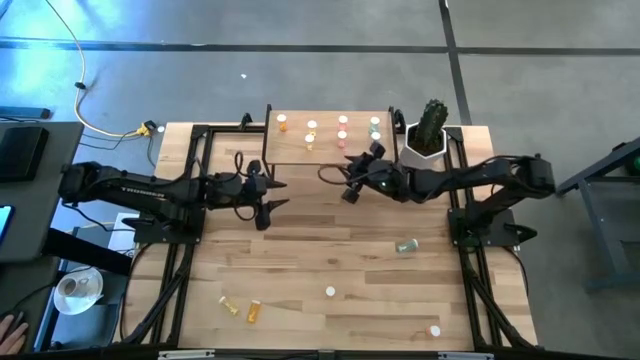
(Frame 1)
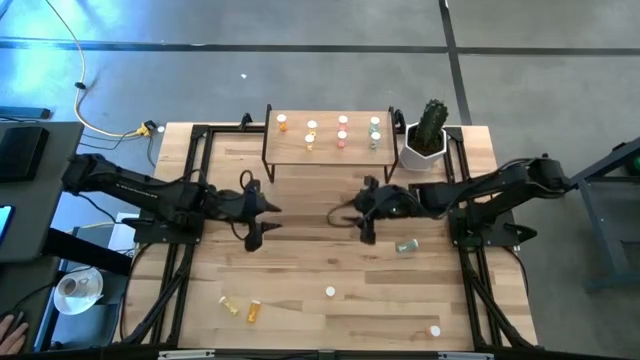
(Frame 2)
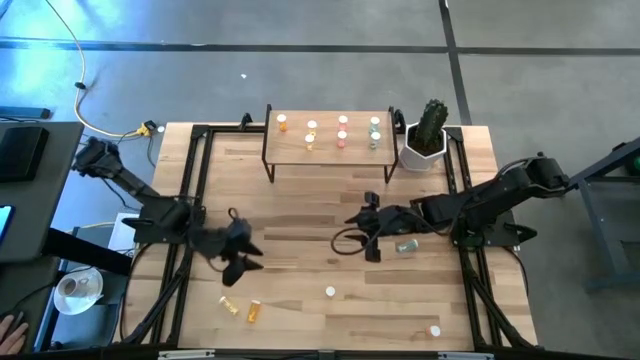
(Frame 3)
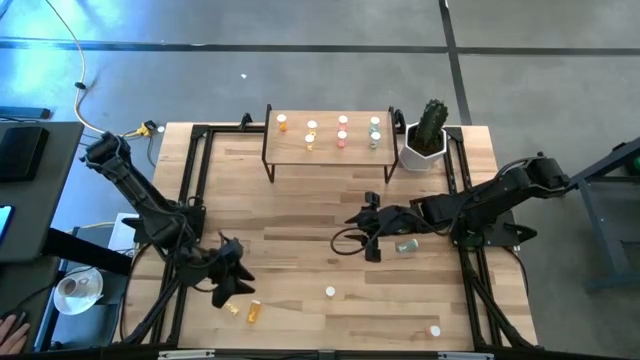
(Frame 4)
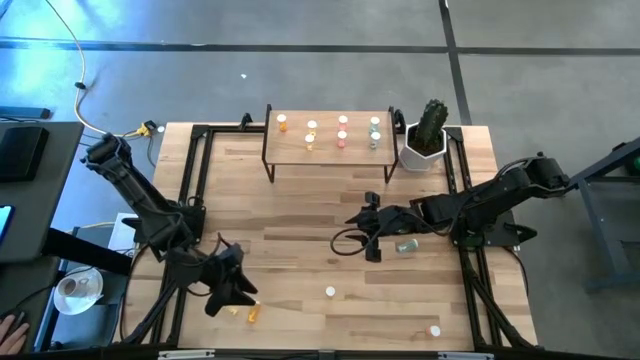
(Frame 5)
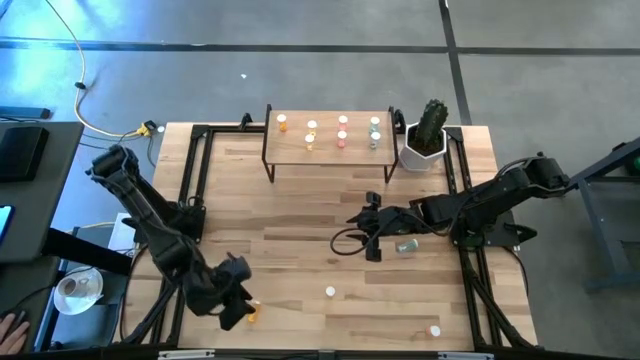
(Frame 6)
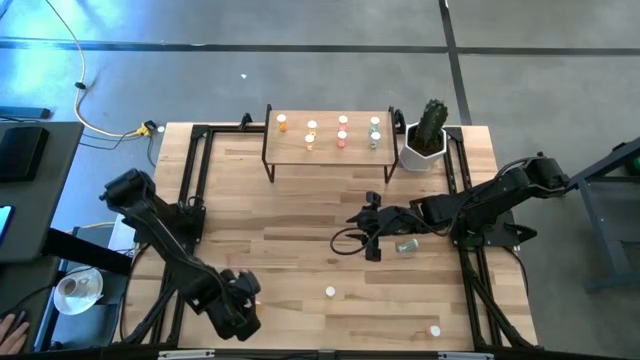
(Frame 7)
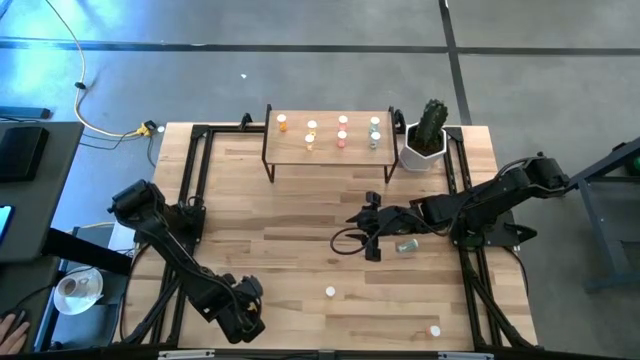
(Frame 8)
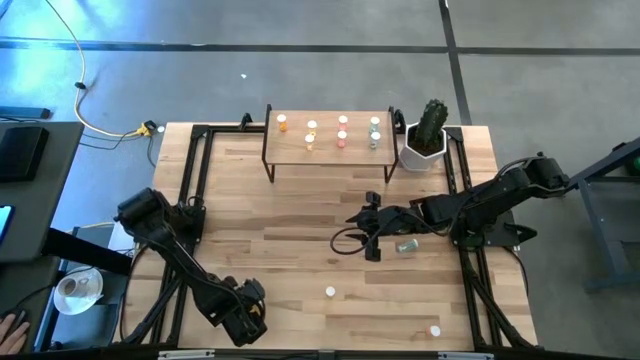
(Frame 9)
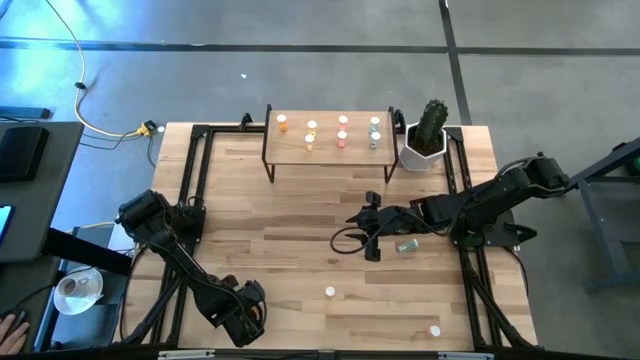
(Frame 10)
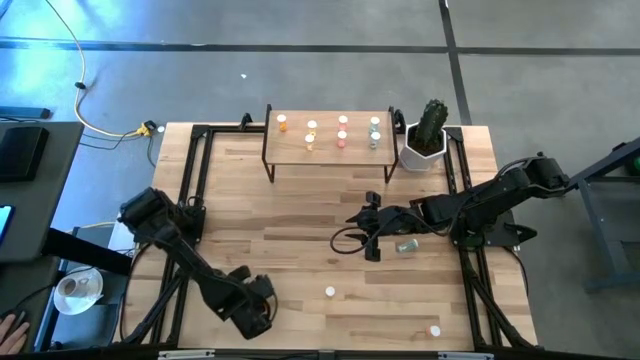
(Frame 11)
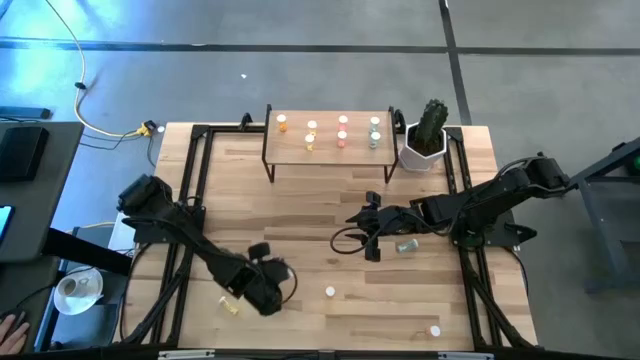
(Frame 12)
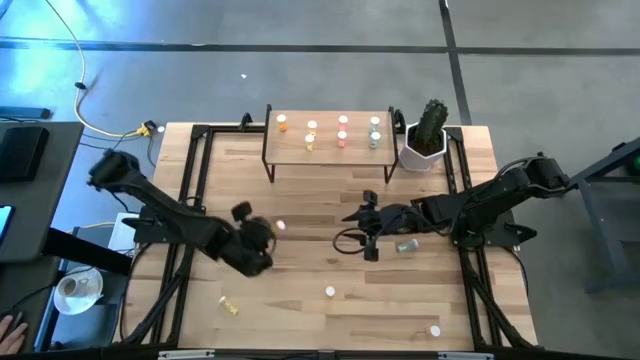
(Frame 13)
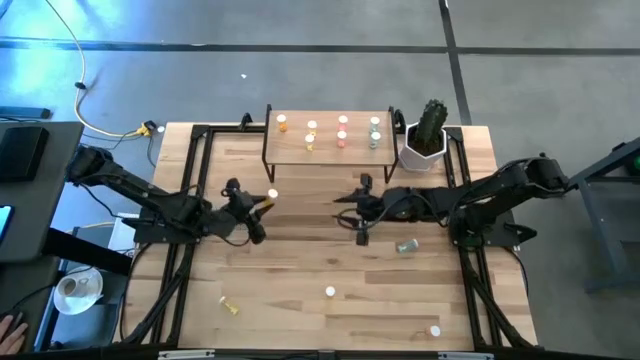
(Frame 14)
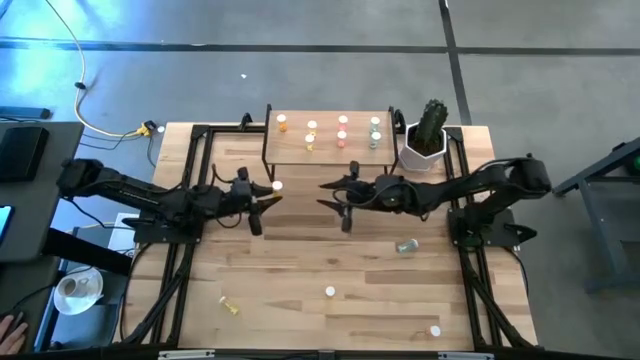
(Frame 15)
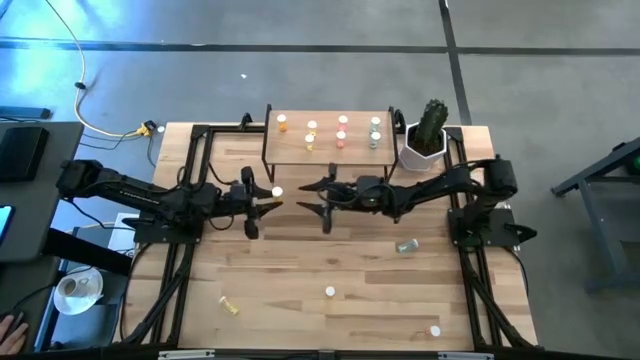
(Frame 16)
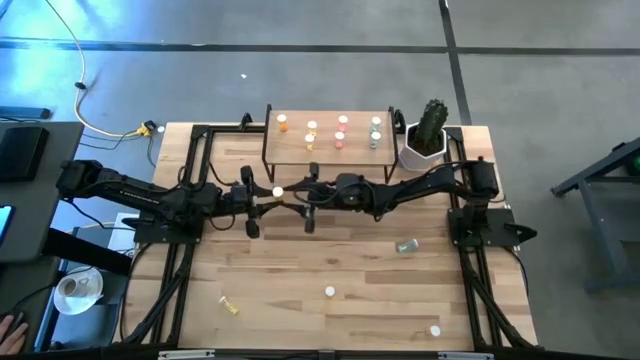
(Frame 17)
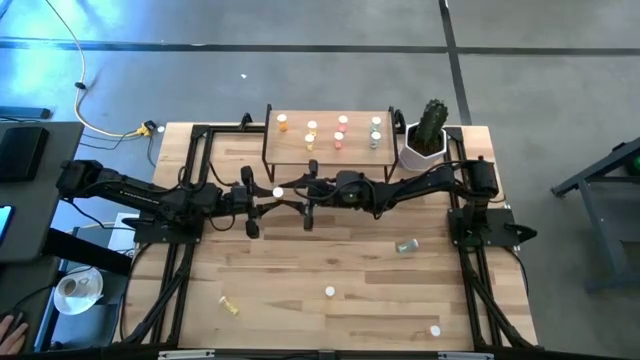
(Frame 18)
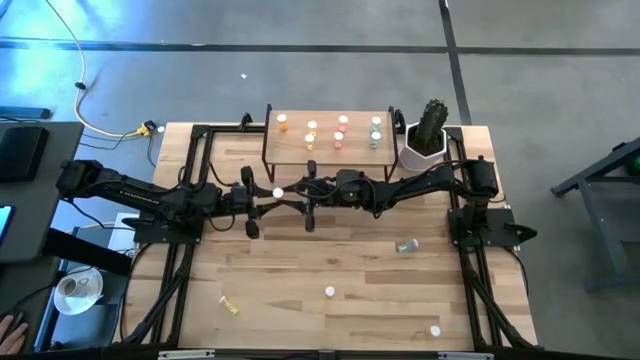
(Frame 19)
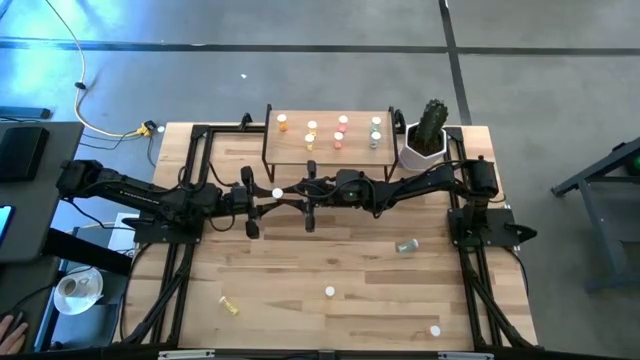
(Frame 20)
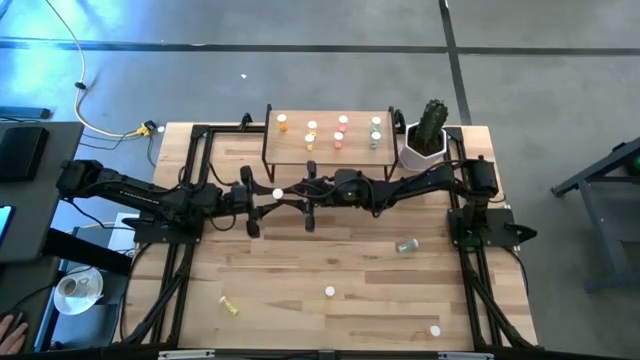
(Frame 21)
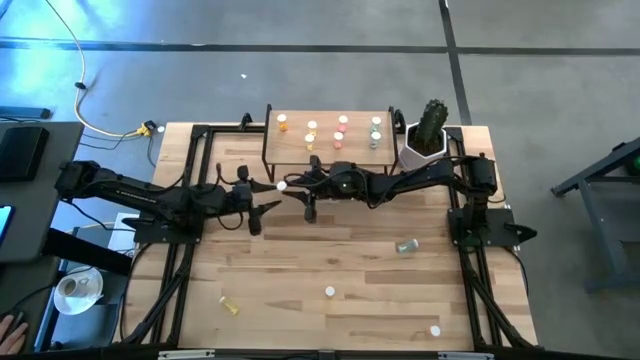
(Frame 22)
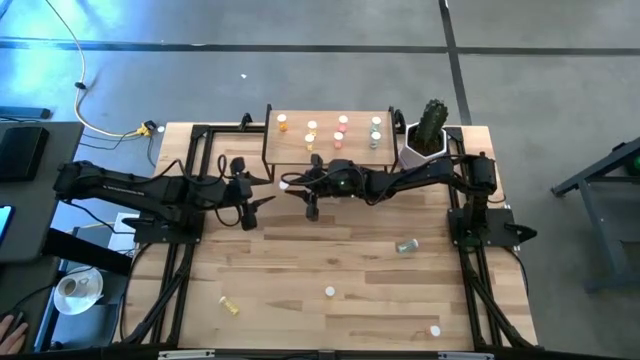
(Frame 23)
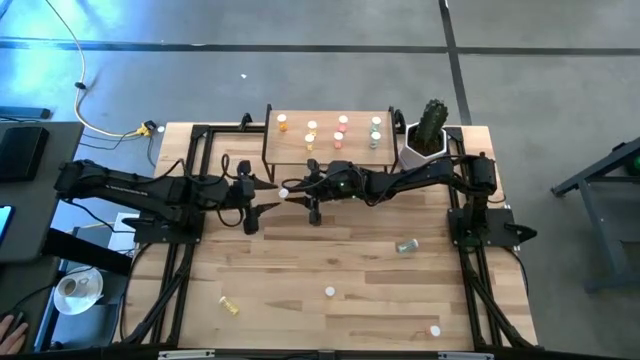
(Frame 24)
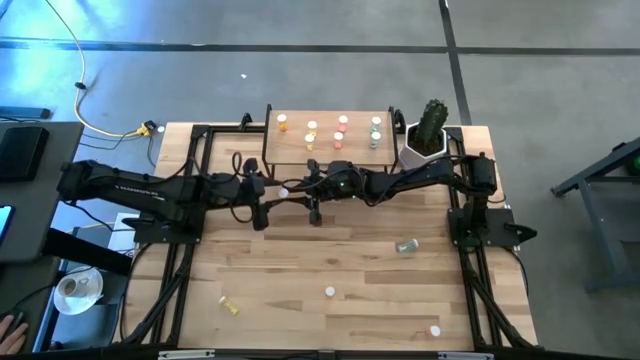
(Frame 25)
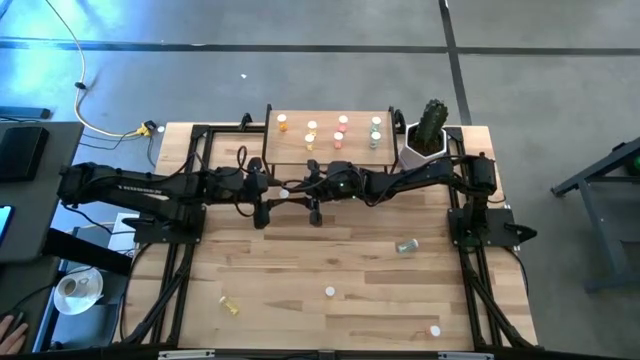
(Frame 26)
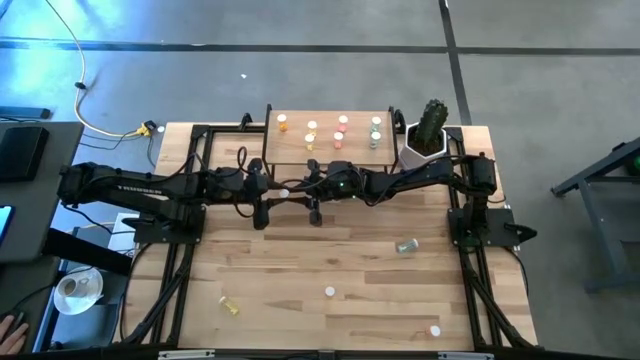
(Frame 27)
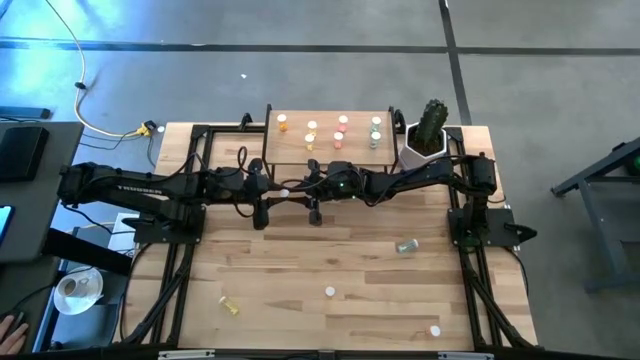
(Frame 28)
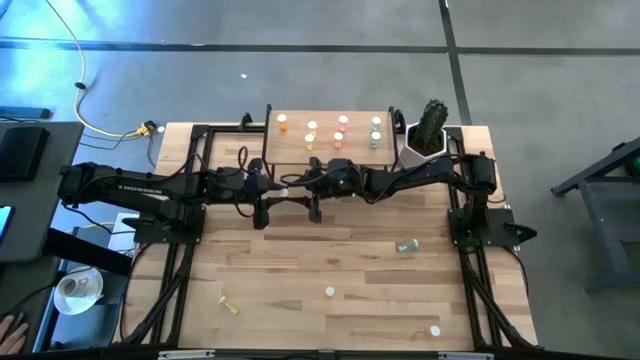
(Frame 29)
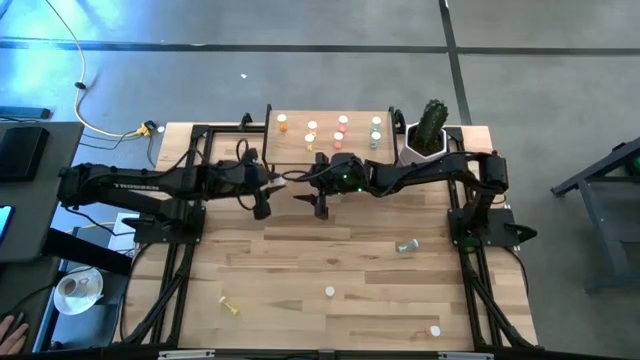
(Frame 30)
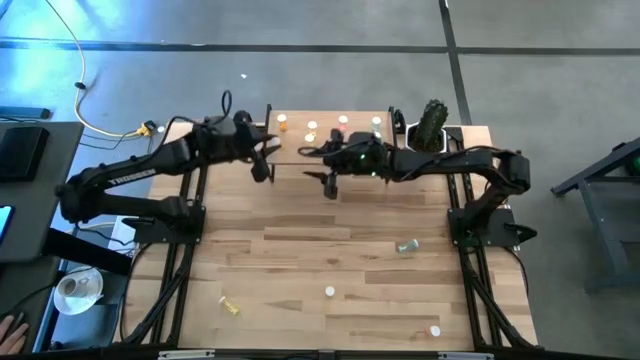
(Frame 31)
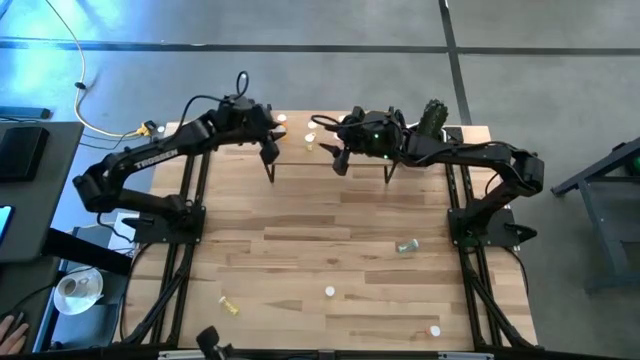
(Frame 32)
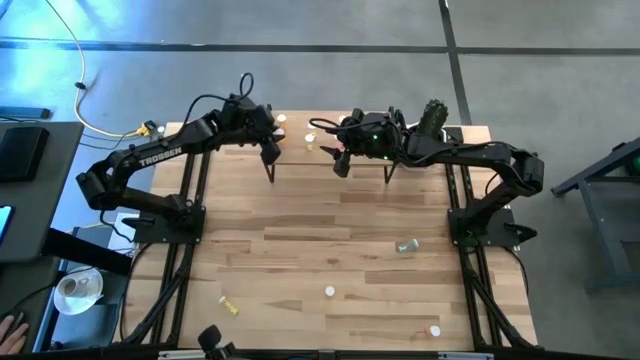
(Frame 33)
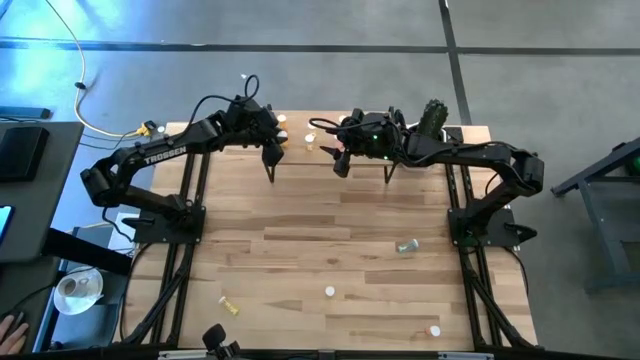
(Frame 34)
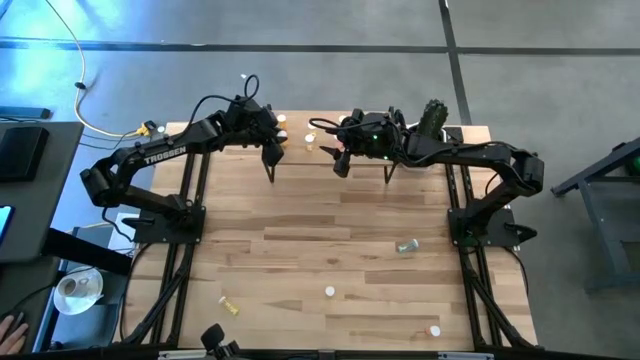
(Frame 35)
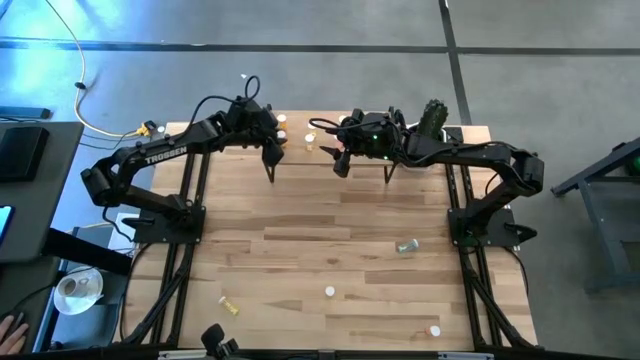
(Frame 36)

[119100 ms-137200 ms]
Task: Pick and place medicine bottles onto shelf by color
Put the left orange pill bottle on the shelf aligned with the other orange pill bottle
